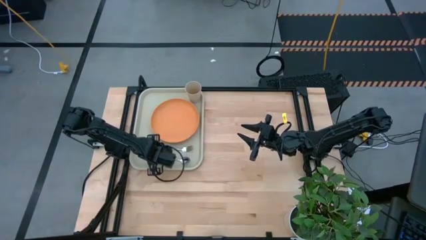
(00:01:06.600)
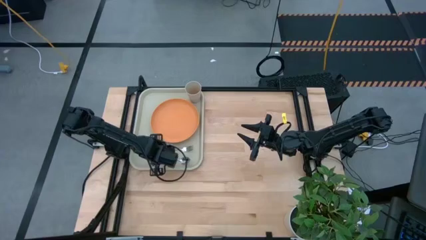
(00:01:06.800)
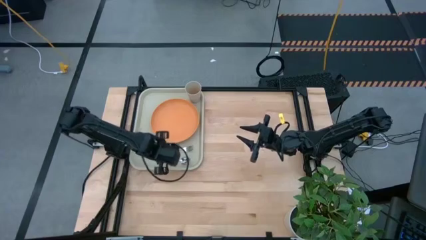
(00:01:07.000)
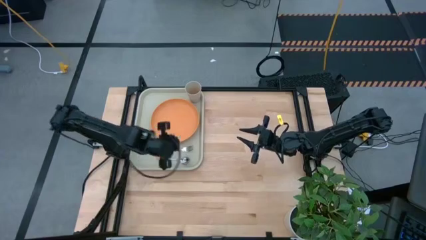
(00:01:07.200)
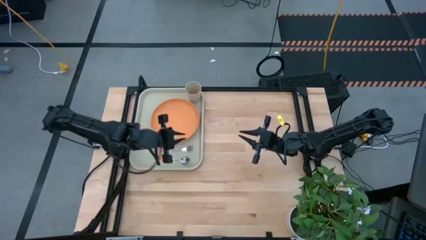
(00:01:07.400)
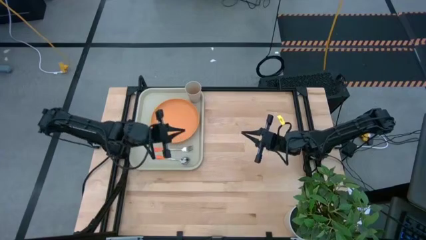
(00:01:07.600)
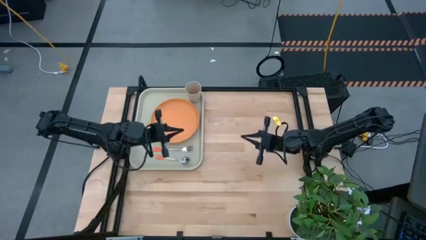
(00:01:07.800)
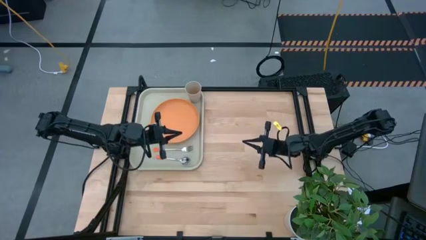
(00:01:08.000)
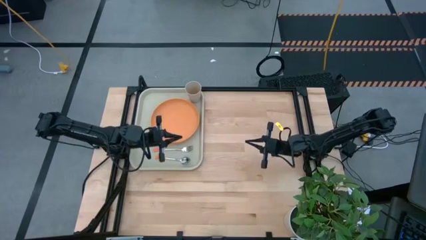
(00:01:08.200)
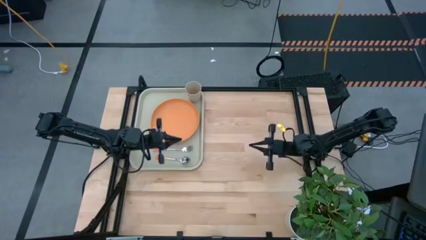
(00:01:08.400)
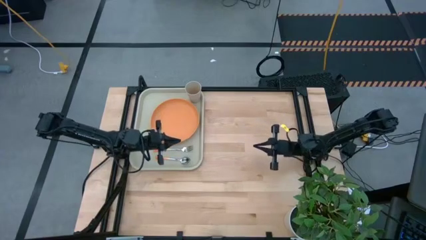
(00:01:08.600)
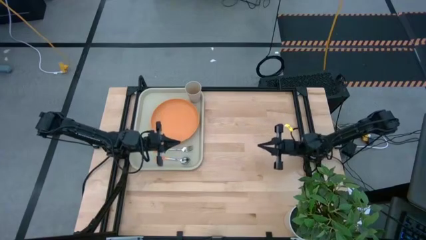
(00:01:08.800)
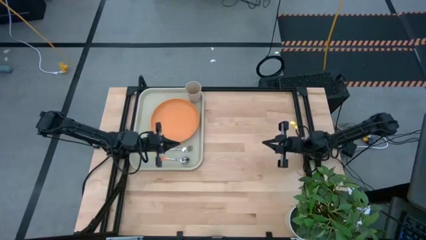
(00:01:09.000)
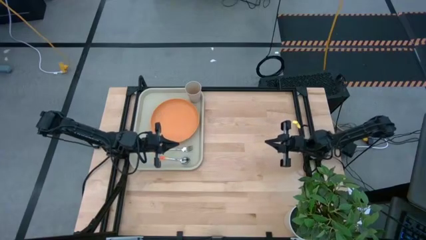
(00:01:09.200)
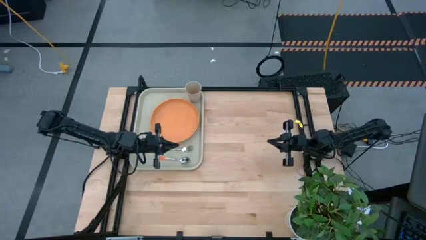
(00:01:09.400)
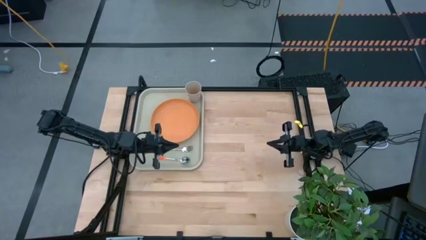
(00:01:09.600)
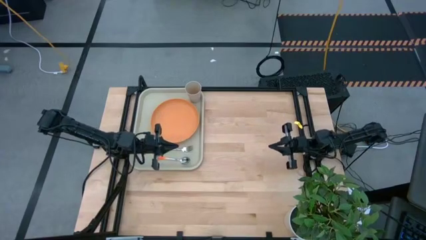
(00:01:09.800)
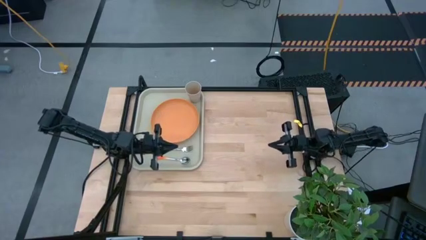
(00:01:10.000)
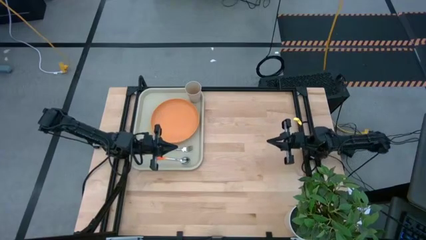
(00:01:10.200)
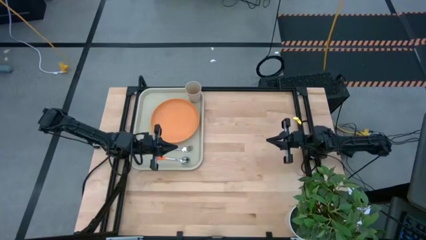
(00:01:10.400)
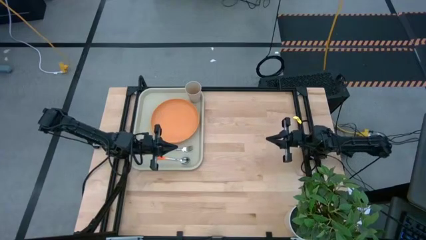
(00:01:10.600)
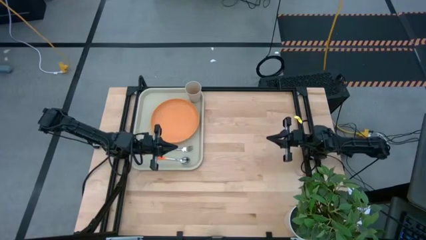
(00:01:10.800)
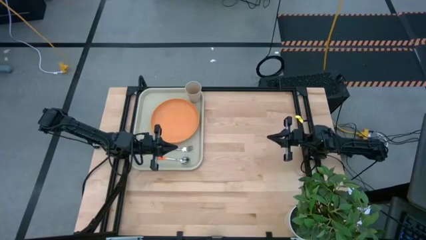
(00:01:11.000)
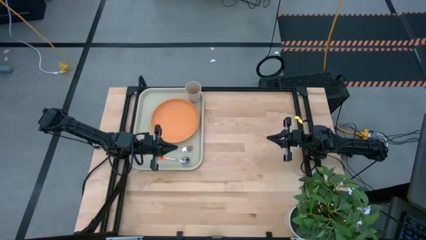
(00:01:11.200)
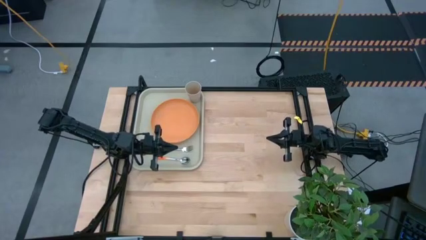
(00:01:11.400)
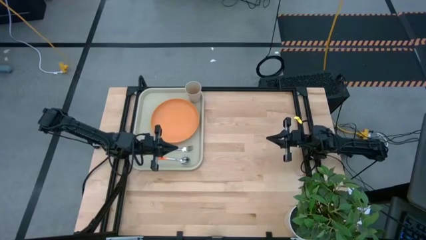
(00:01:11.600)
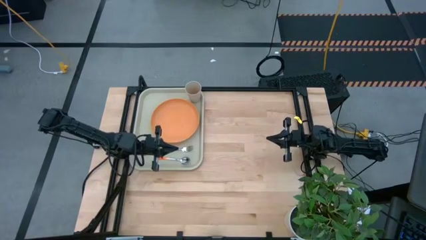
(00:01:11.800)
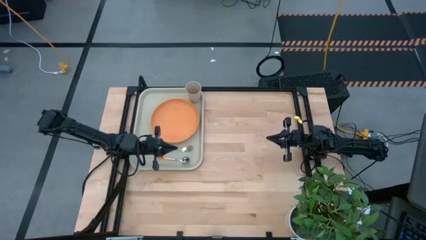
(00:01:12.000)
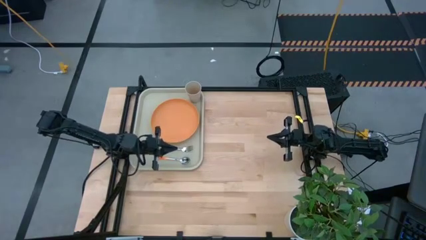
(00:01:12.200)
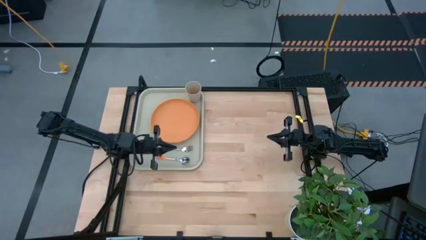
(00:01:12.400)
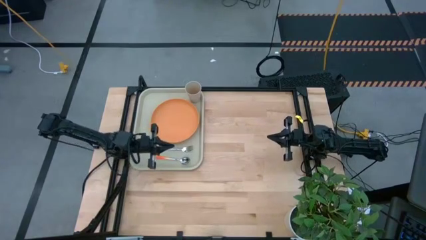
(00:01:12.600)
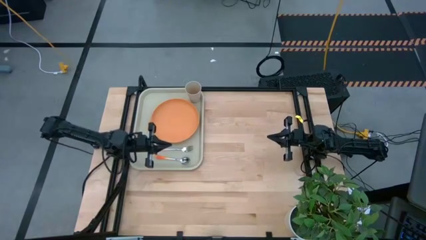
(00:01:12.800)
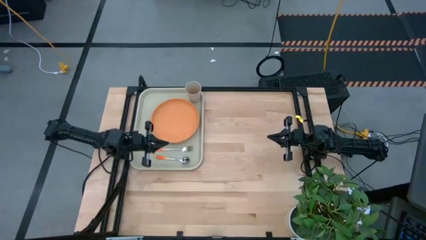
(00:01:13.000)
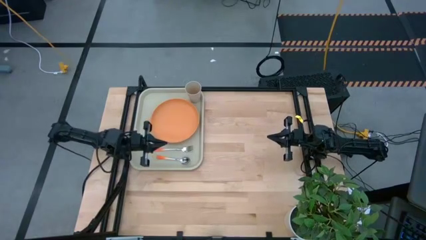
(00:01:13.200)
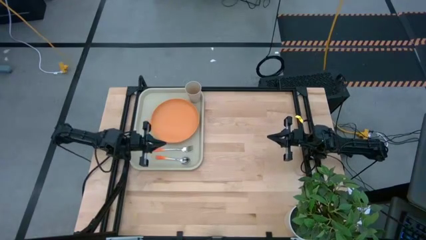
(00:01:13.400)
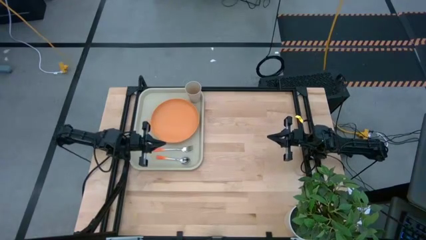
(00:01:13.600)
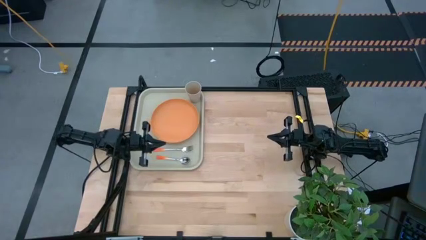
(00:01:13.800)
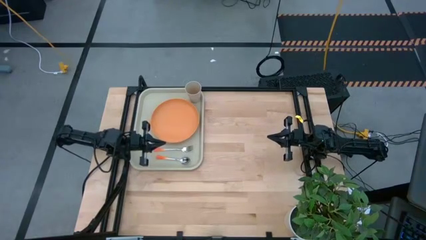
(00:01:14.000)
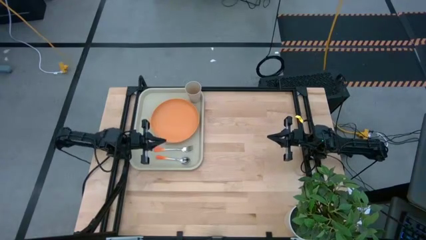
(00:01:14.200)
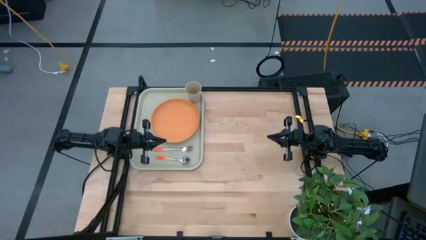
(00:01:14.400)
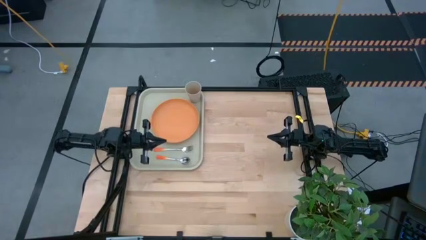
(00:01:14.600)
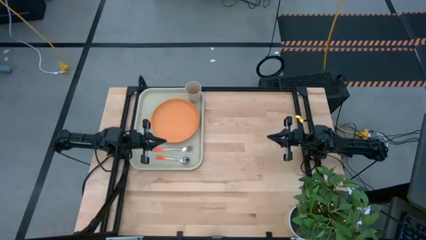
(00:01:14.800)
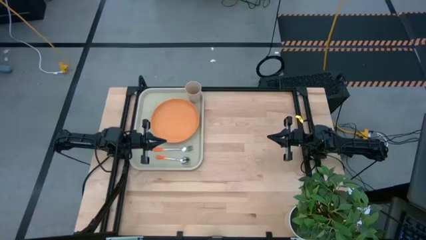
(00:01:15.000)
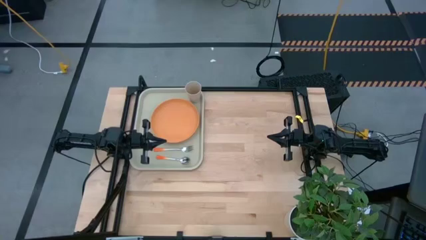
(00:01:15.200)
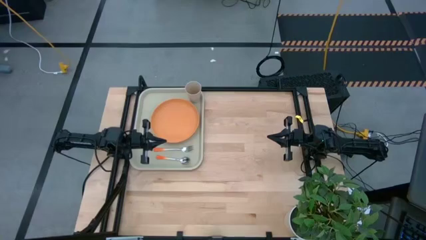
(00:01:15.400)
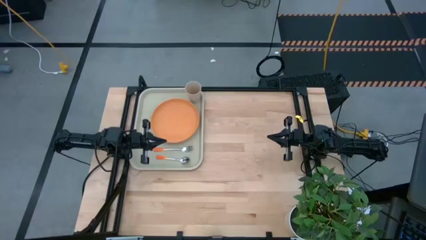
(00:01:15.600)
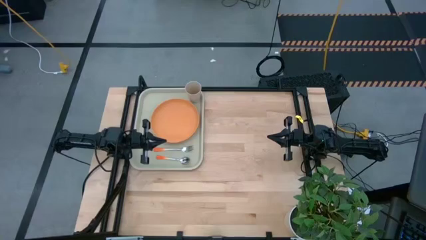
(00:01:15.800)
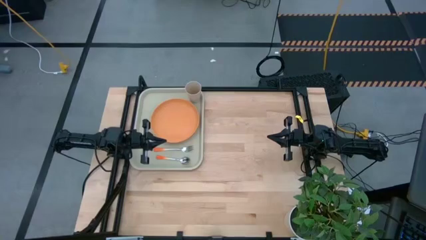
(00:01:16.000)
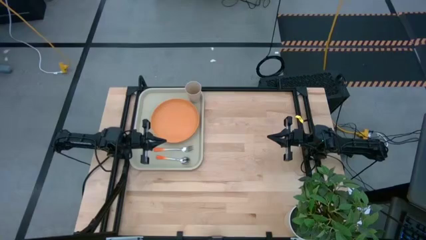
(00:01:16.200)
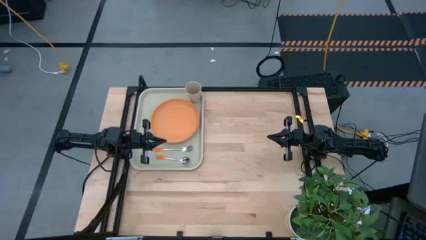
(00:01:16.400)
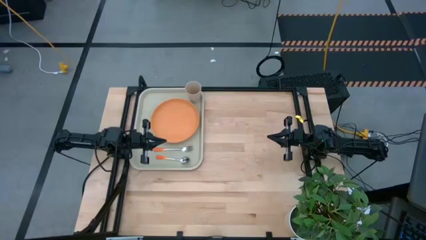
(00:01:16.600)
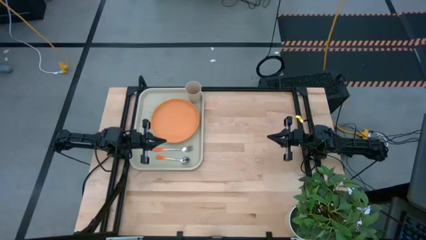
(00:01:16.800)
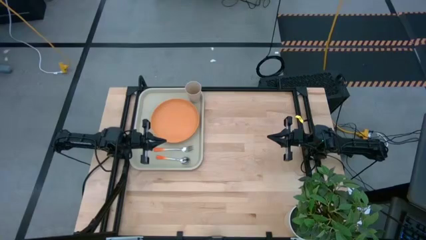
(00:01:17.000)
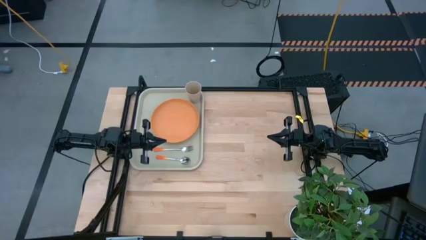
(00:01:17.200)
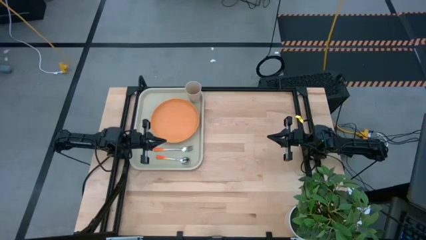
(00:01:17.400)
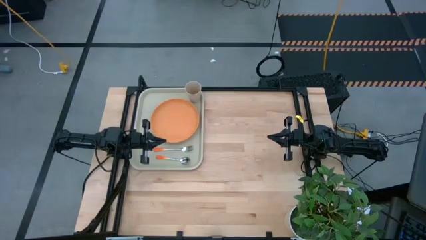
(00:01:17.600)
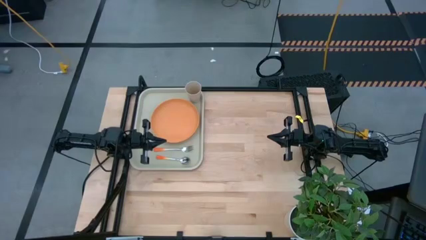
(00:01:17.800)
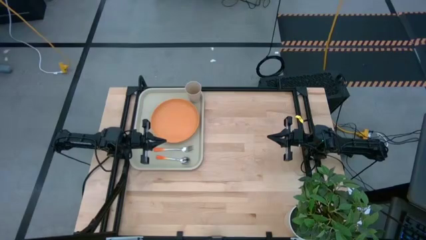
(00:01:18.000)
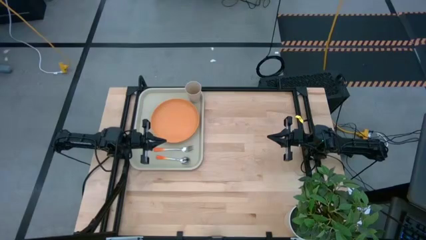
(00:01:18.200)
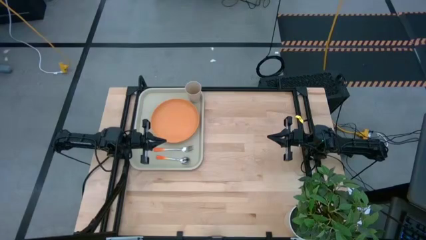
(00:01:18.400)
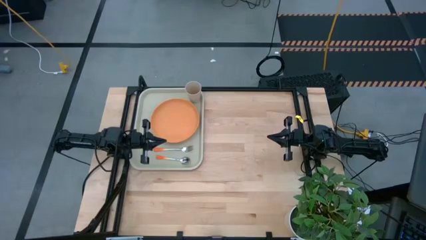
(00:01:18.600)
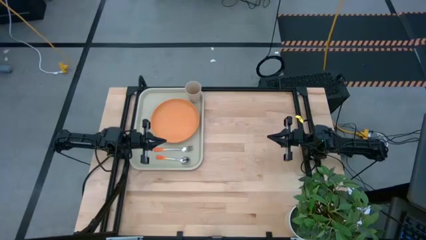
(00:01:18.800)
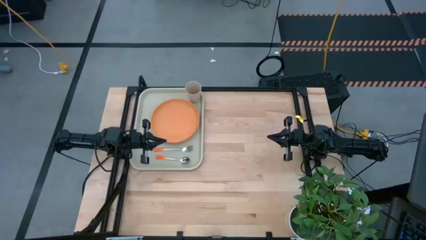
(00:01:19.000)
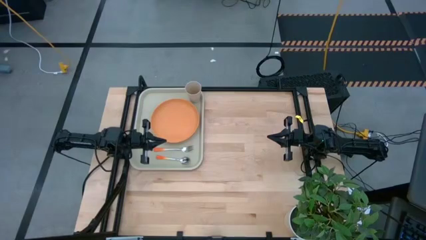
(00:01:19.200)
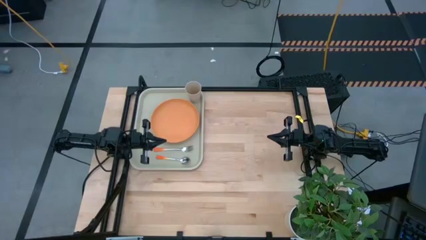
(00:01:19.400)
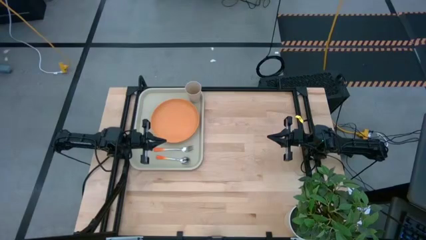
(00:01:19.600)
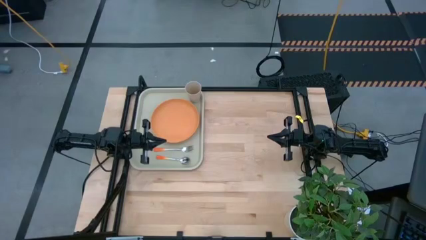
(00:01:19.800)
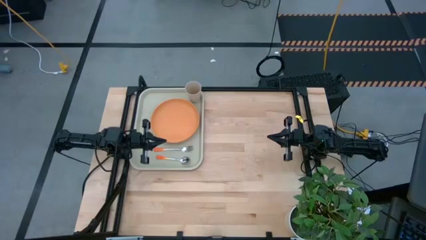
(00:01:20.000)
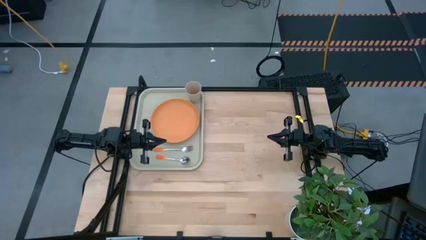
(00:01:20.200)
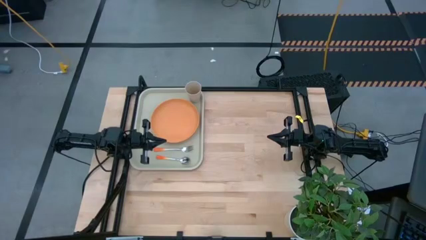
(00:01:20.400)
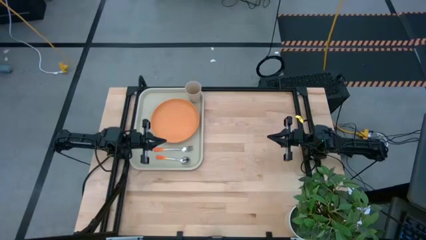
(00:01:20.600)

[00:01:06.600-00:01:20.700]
Task: Pick and place plate/cup/fork/spoon on tray
Return to Home Position

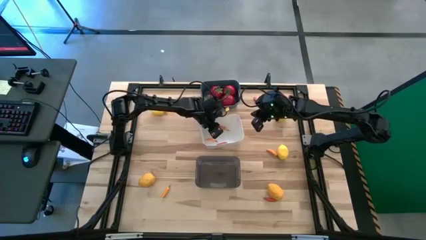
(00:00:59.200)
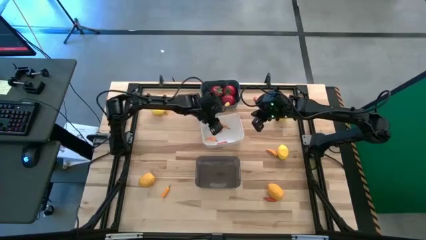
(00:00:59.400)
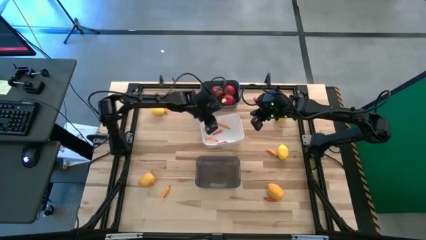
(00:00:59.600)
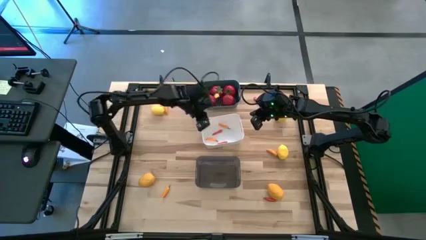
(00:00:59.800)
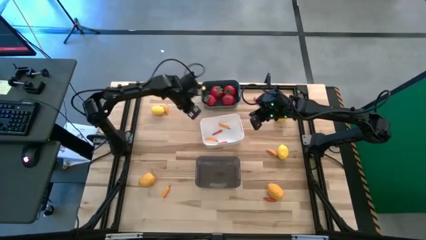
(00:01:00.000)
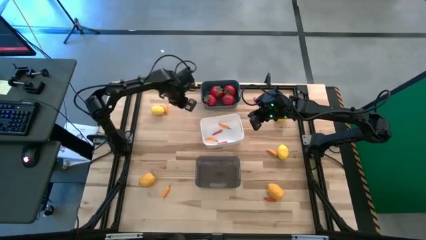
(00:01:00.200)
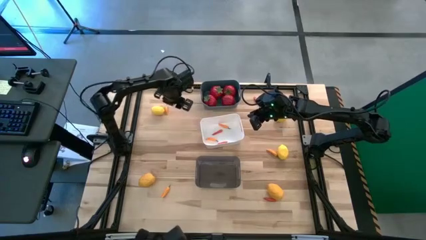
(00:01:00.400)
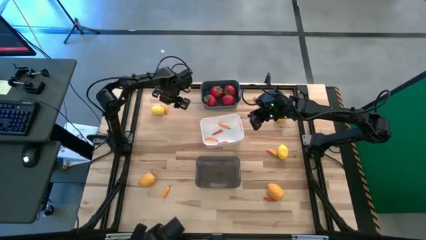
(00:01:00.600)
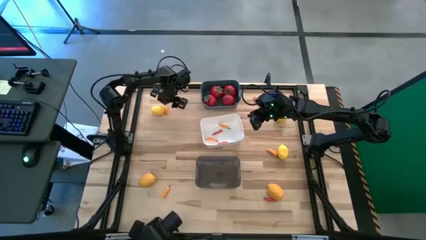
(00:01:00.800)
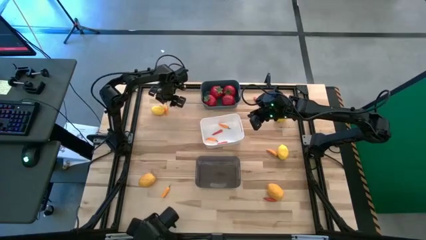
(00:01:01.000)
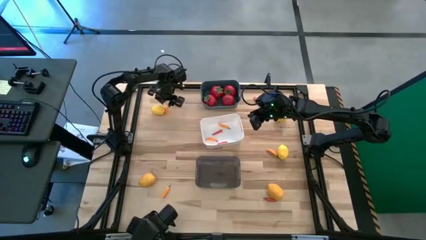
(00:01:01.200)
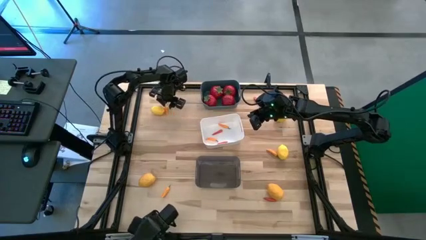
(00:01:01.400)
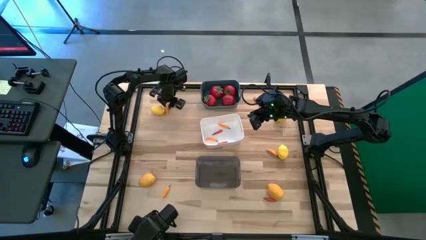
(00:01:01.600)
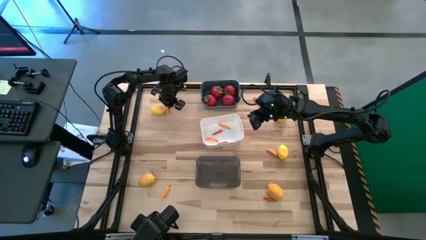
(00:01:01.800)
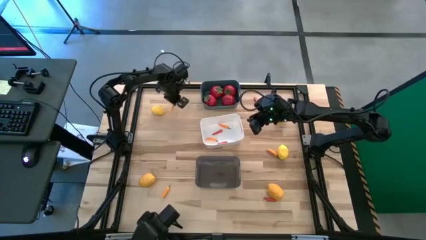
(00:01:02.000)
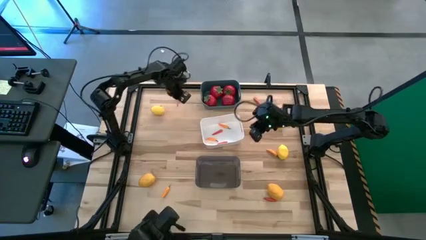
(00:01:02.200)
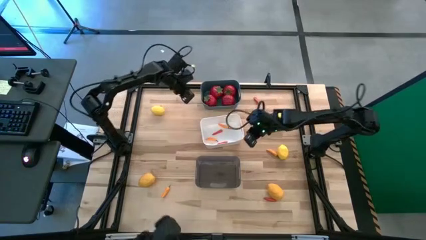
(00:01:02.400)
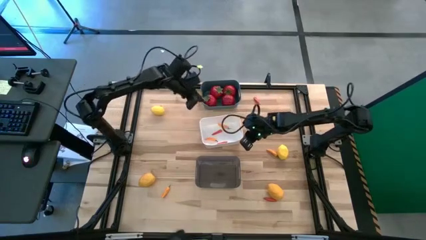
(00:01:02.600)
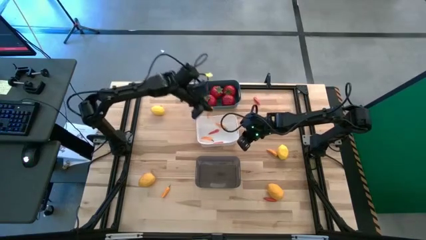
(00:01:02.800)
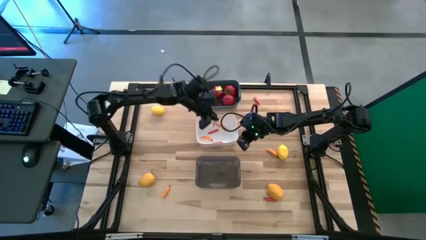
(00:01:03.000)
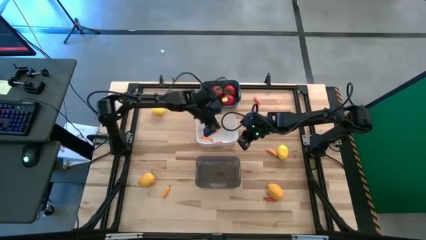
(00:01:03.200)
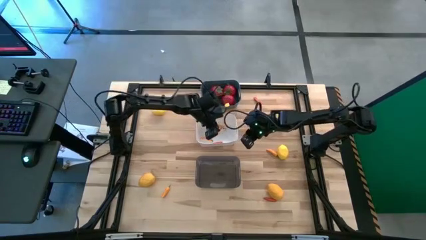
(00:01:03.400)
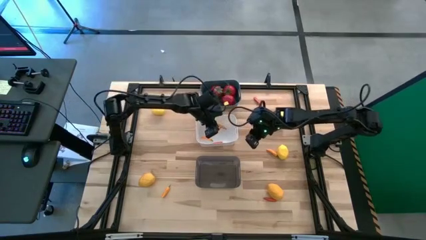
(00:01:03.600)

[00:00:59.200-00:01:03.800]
Task: Sort produce into baskets
Put the orange chili pepper into the white bin
